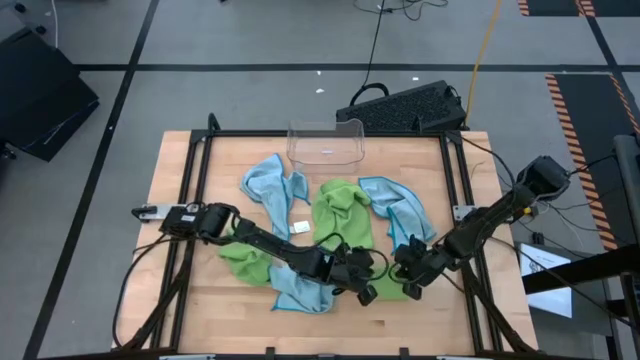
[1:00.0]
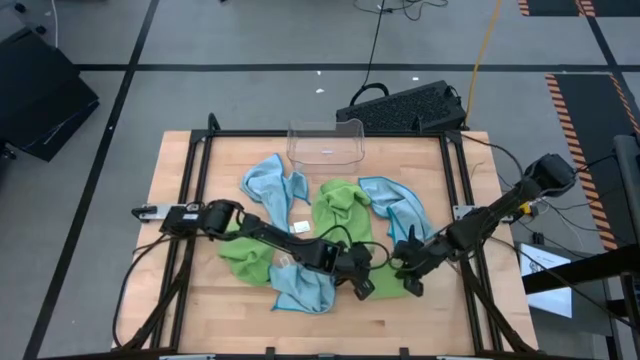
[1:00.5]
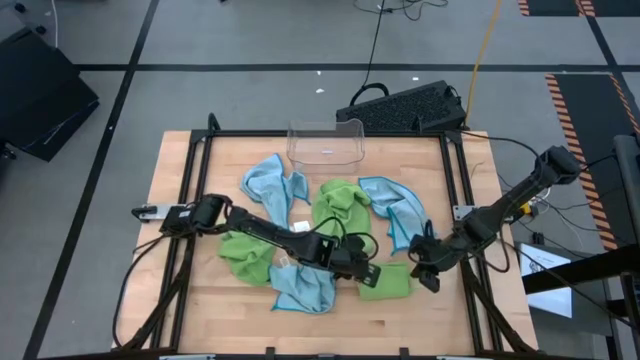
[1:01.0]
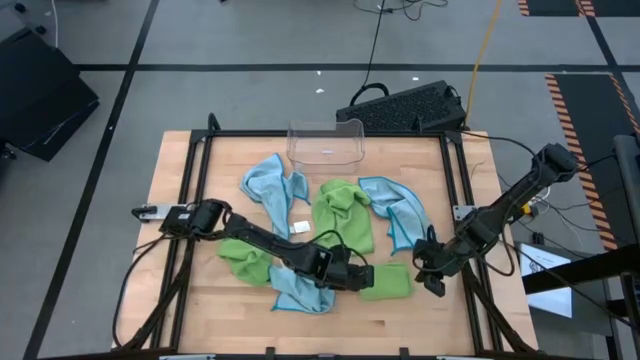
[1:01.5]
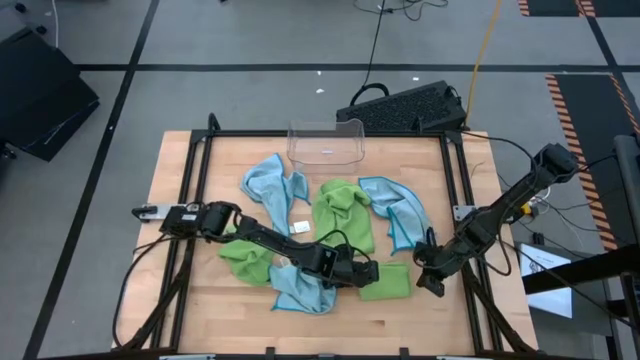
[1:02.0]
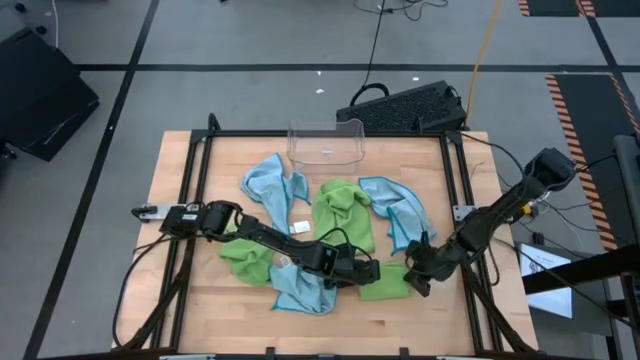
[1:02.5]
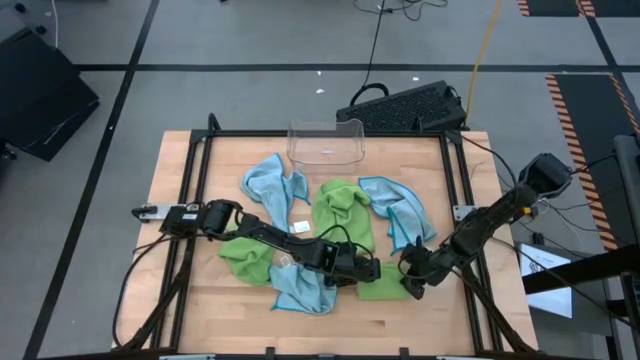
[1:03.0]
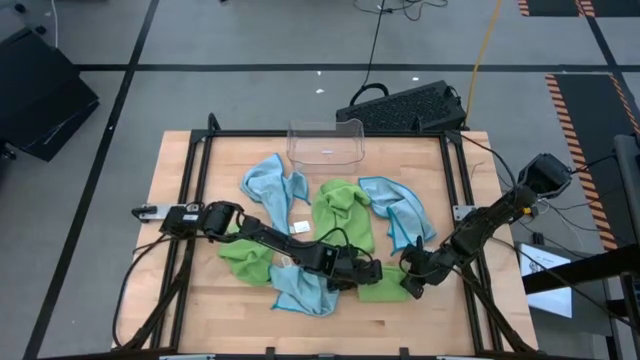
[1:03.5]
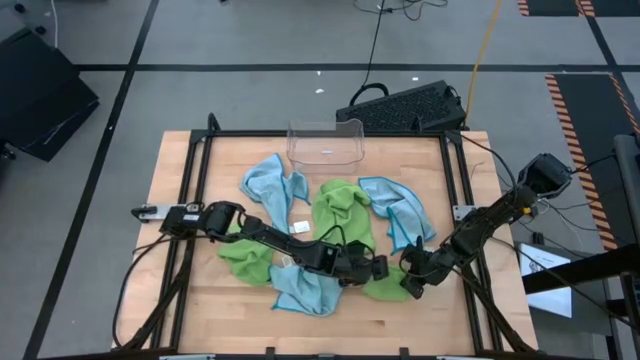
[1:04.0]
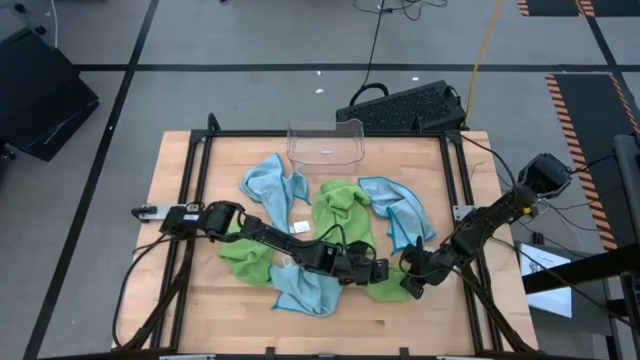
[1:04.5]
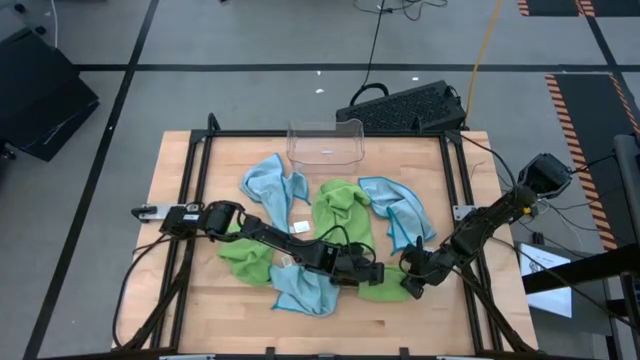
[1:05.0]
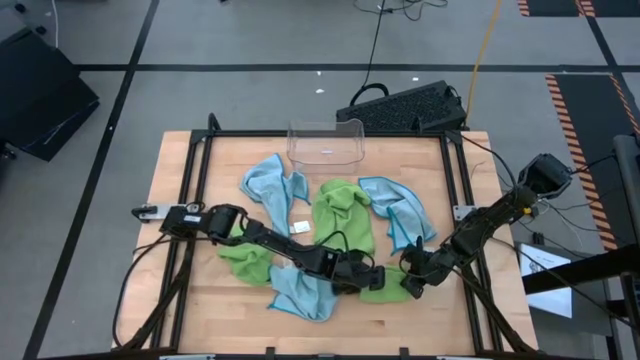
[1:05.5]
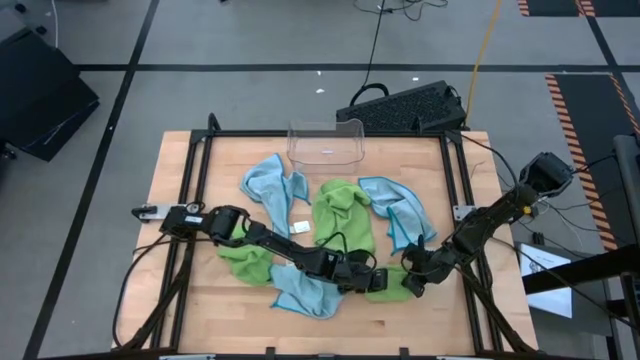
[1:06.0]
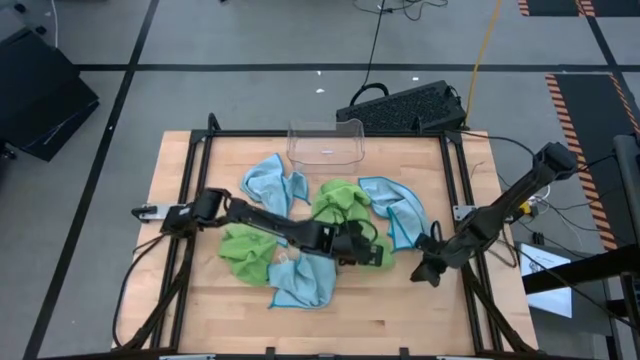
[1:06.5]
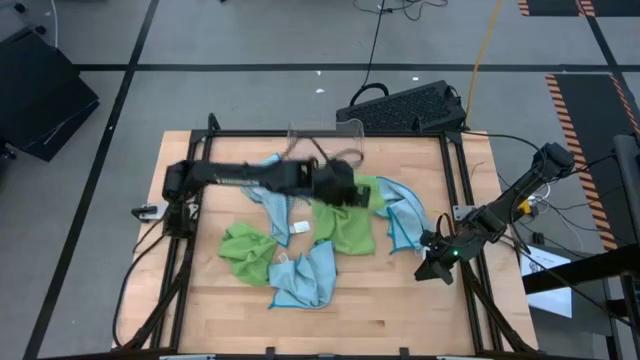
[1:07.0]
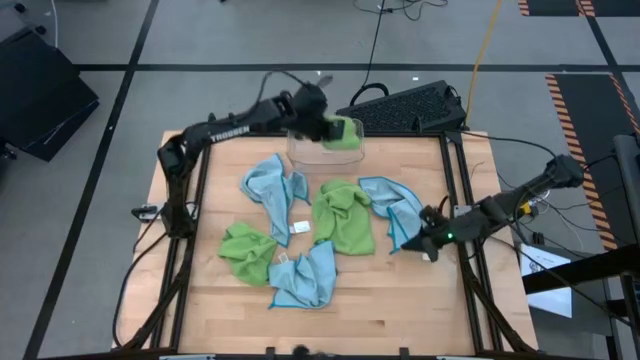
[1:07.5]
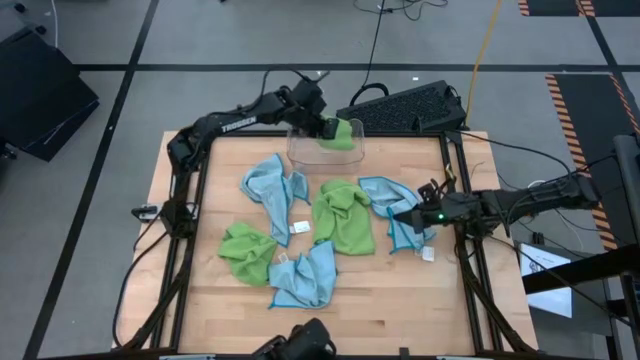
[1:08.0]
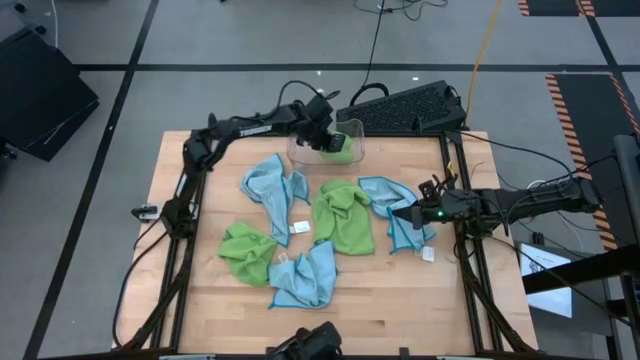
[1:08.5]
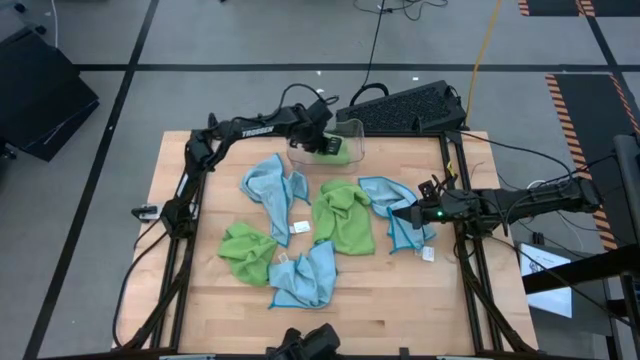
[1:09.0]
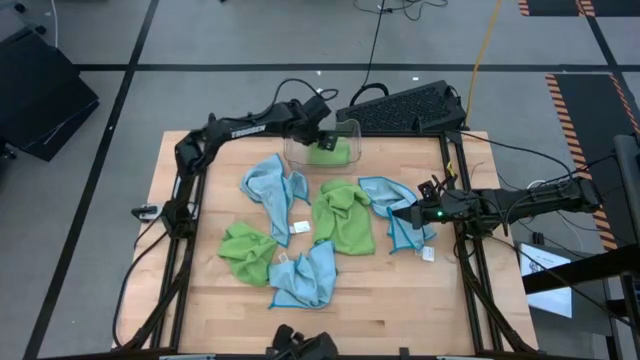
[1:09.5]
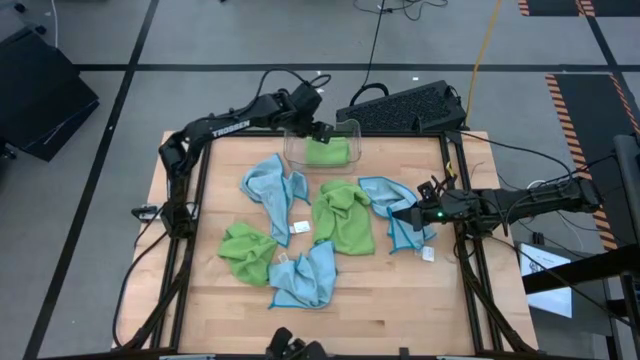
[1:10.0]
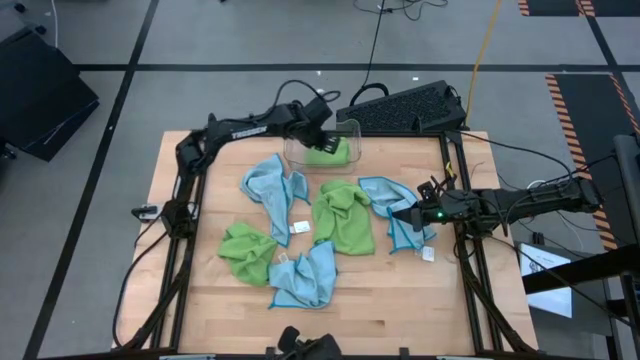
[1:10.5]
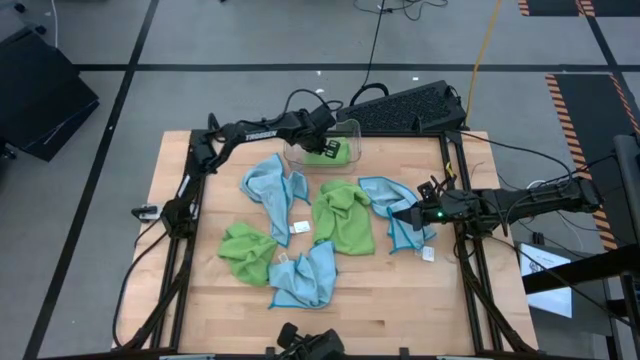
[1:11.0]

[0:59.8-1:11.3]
Task: Fold microfiber towels
Put the bottom right folded green microfiber cloth into the transparent bin

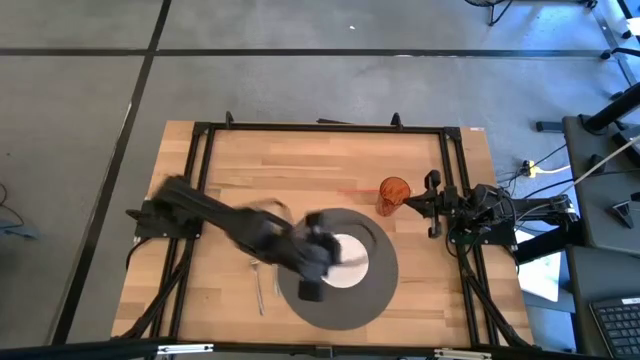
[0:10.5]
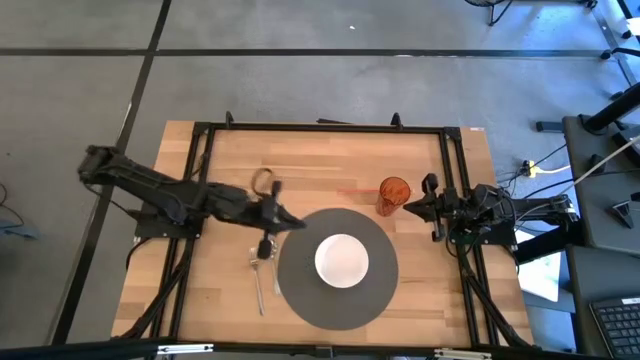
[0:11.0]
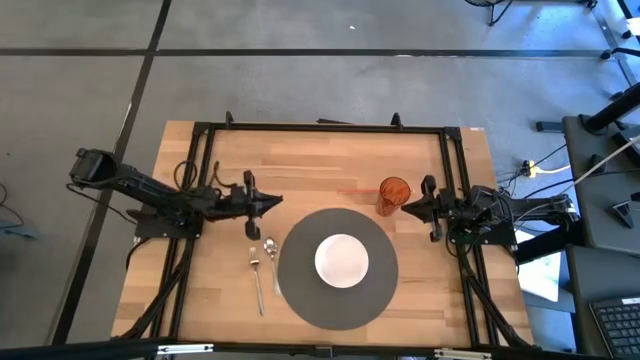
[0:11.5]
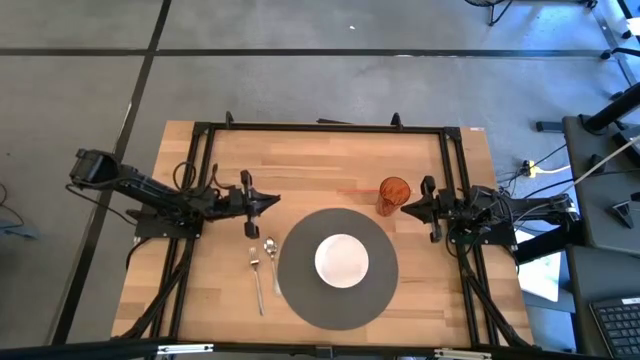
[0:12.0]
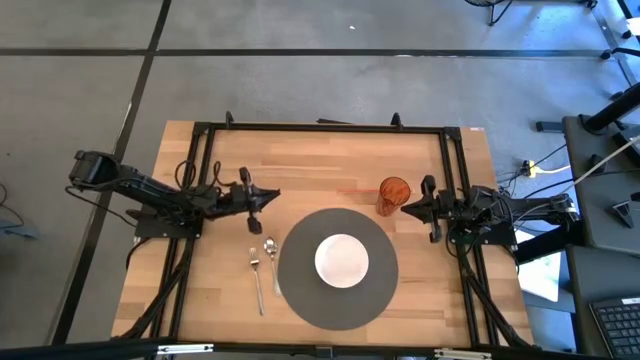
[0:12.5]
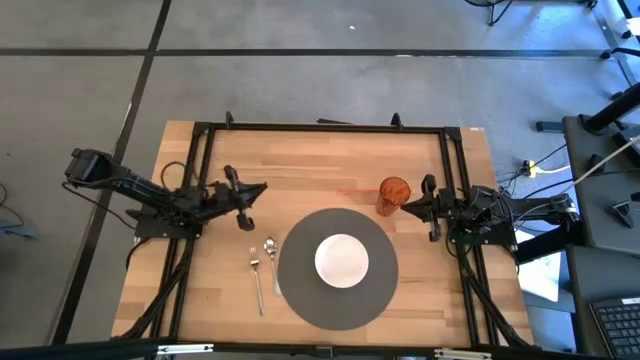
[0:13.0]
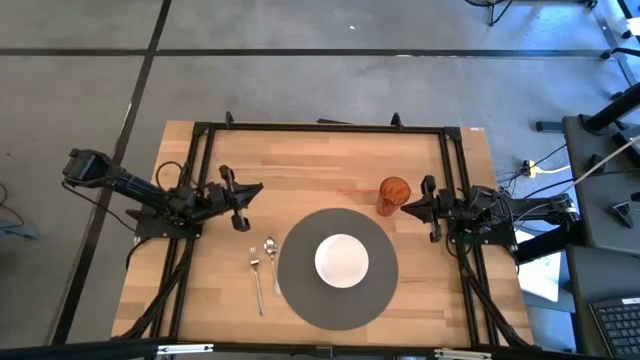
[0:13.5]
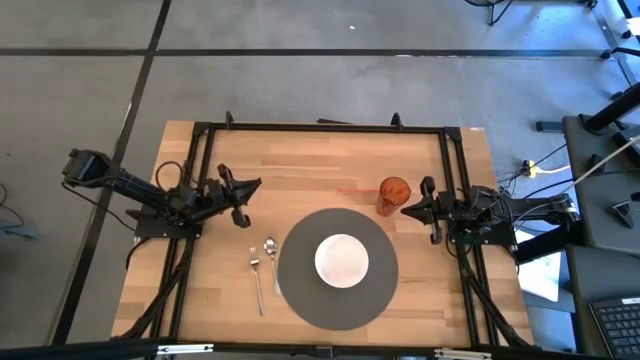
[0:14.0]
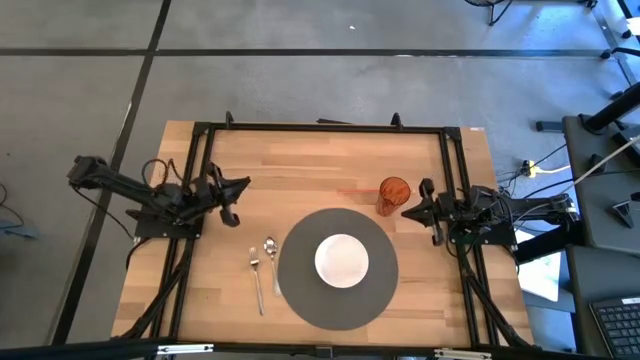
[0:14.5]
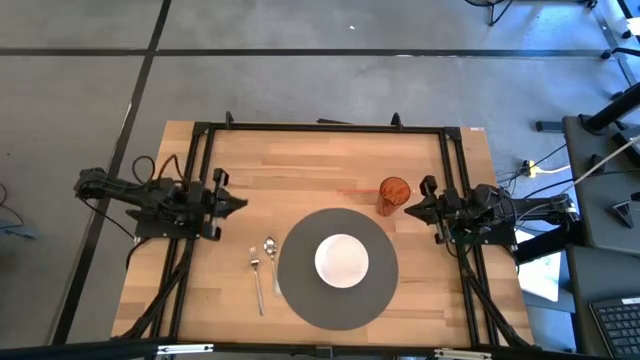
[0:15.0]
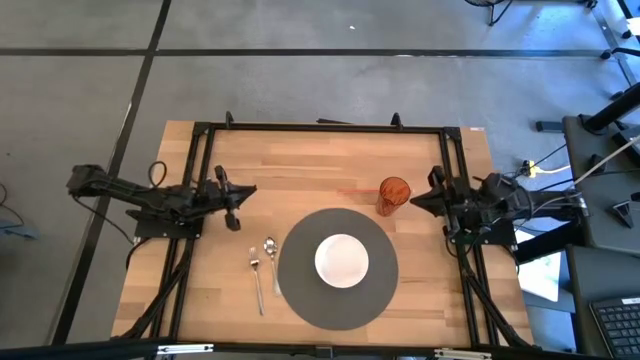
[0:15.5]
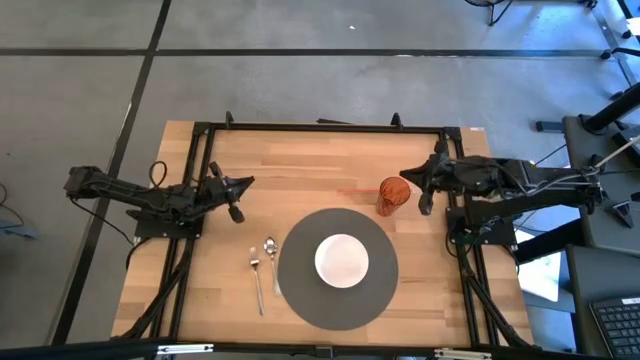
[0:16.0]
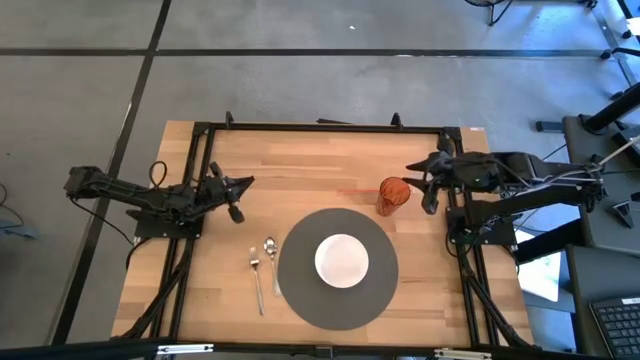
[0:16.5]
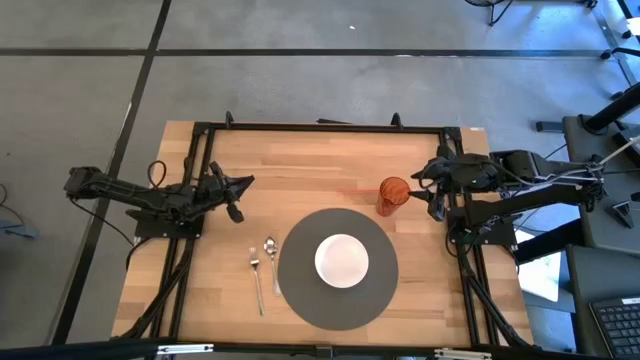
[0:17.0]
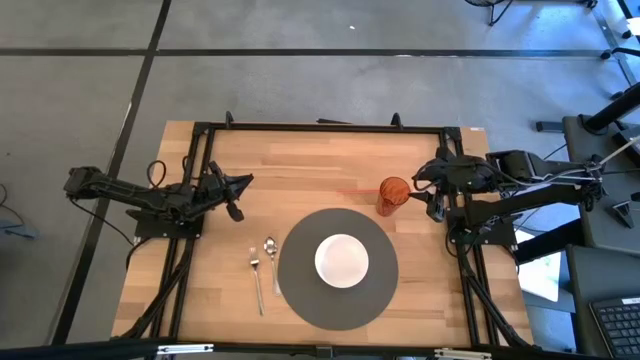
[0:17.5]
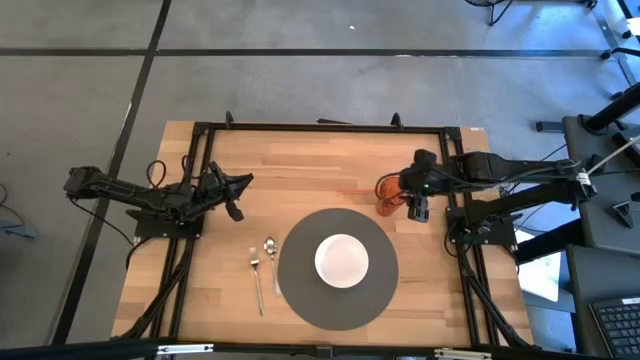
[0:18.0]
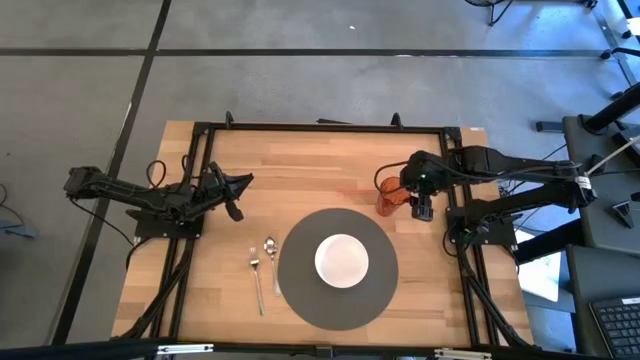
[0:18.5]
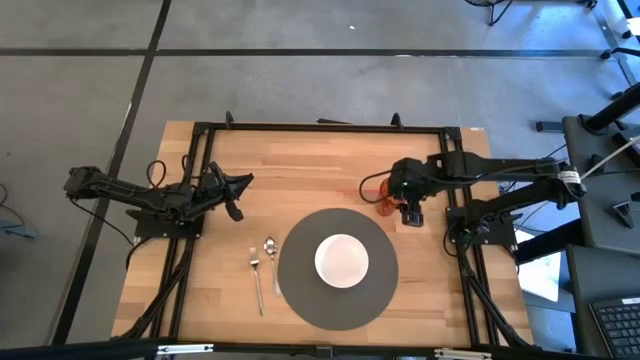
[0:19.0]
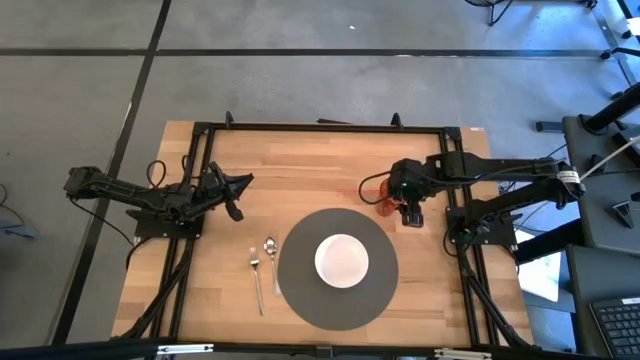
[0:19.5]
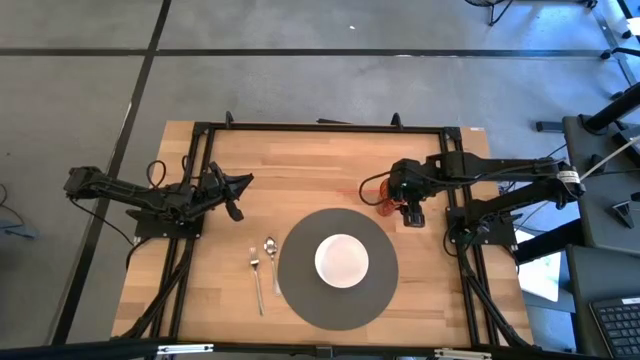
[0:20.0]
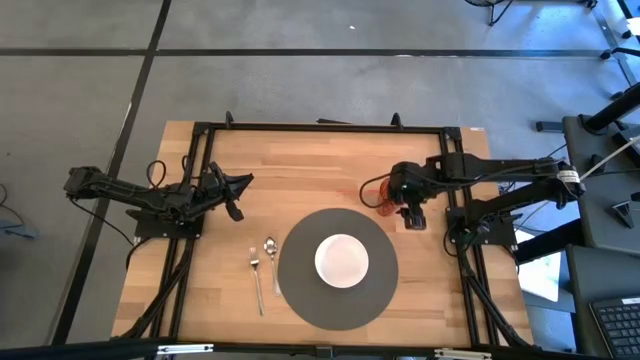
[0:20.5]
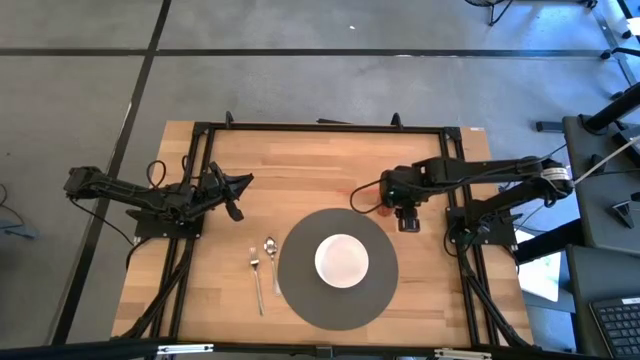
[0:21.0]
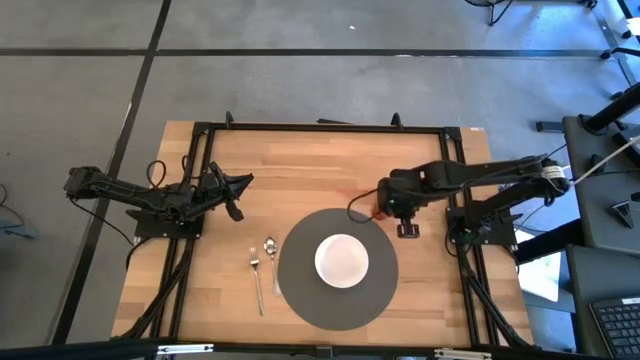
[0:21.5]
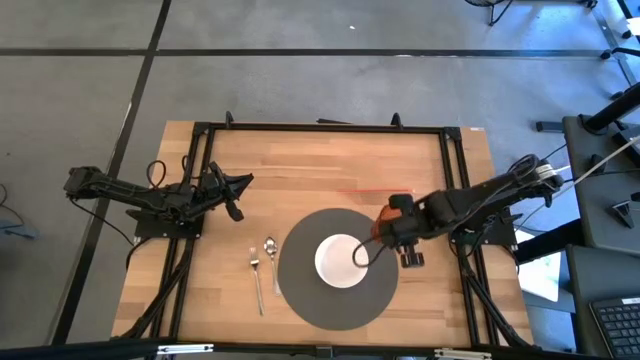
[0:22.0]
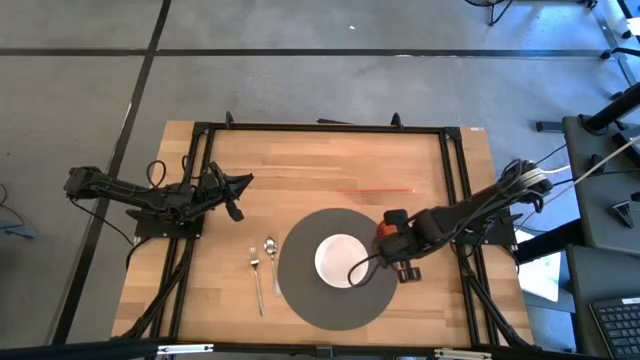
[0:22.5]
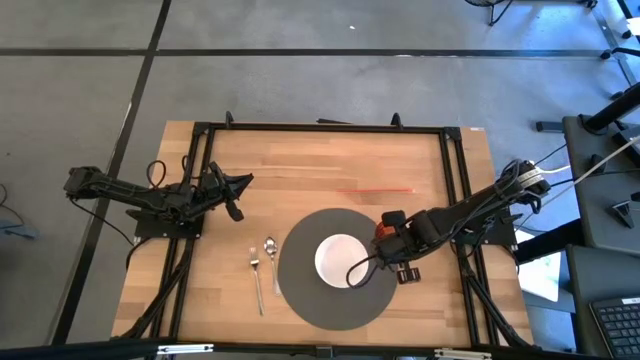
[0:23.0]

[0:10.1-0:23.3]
Task: Pick & Place Utensil
Put the orange glass on the gray mat to the right of the white bowl
